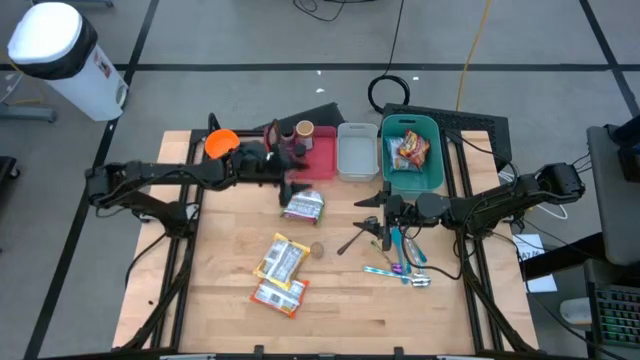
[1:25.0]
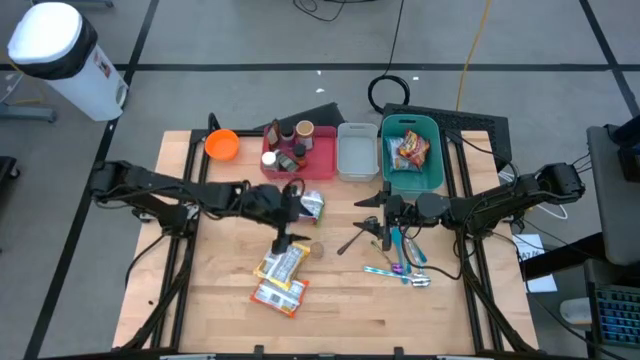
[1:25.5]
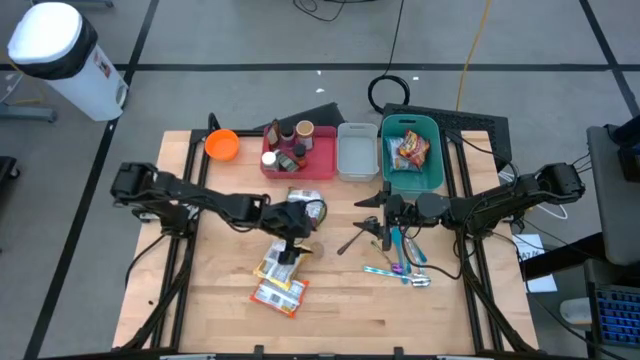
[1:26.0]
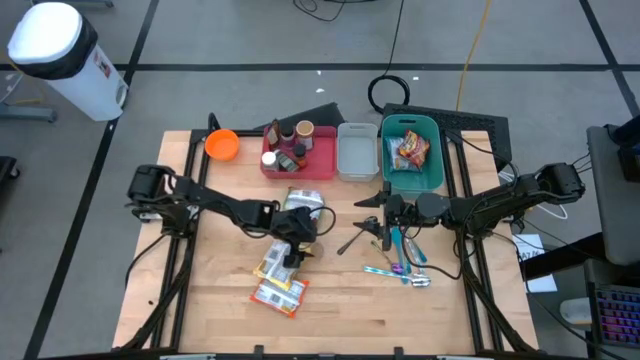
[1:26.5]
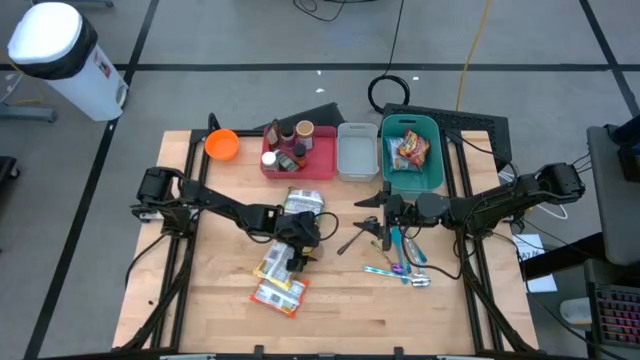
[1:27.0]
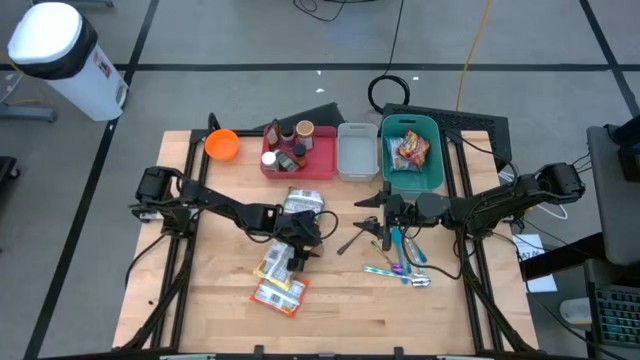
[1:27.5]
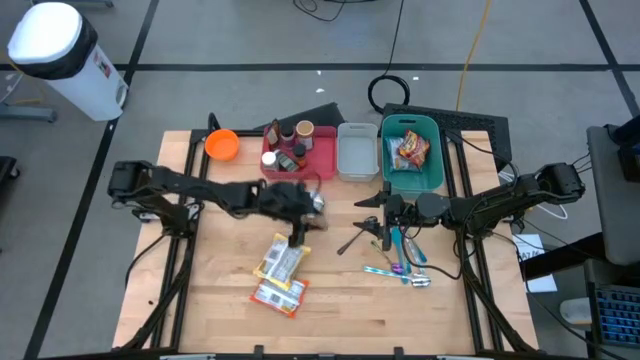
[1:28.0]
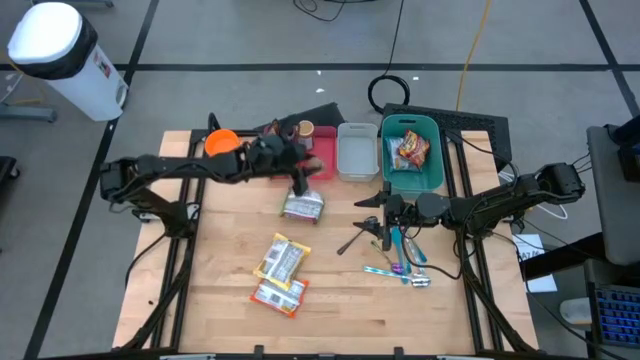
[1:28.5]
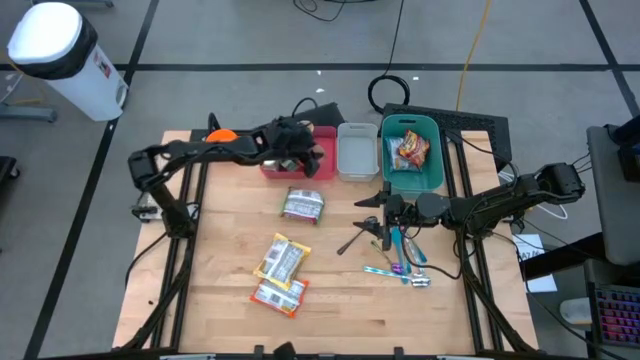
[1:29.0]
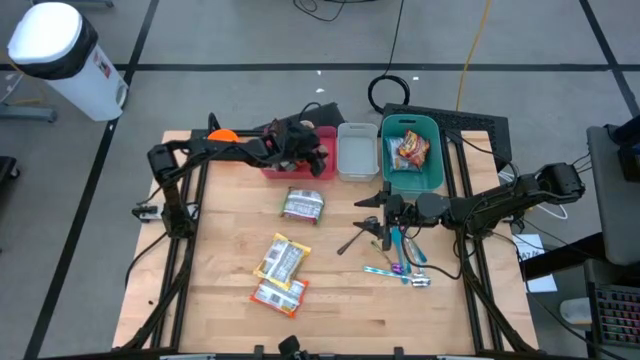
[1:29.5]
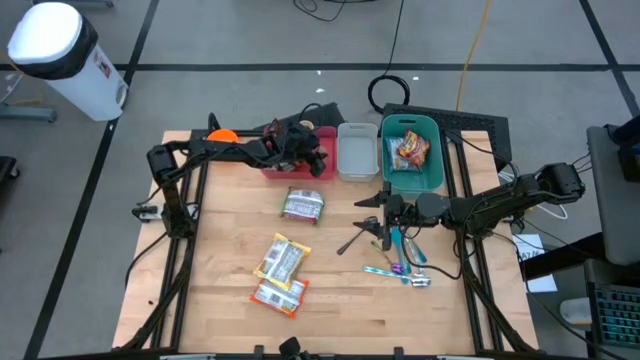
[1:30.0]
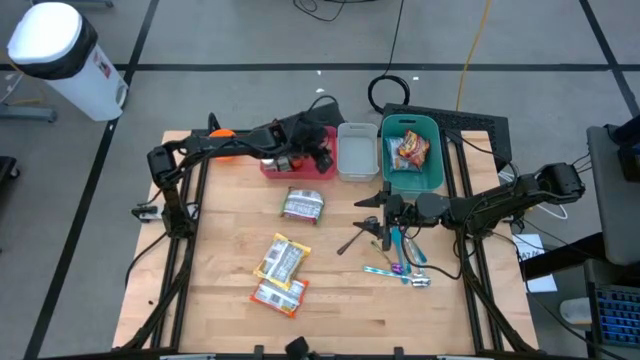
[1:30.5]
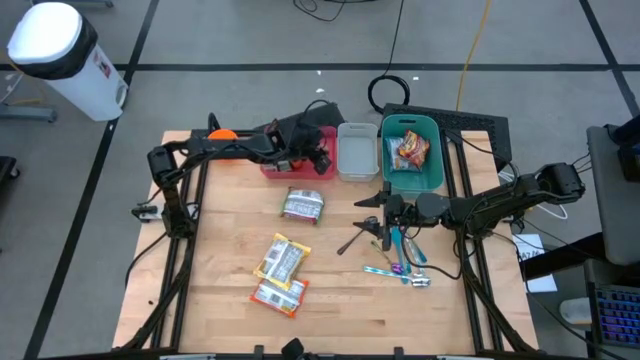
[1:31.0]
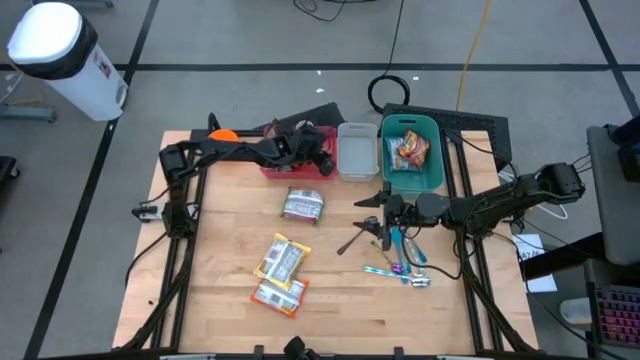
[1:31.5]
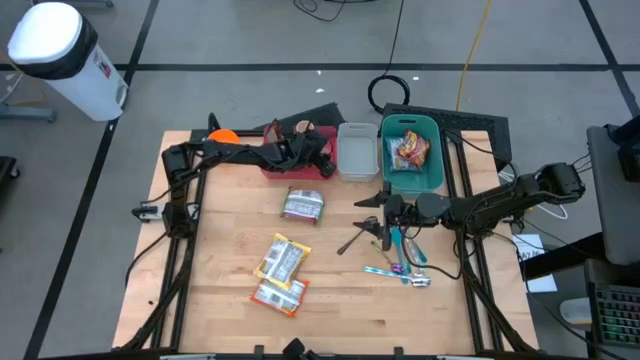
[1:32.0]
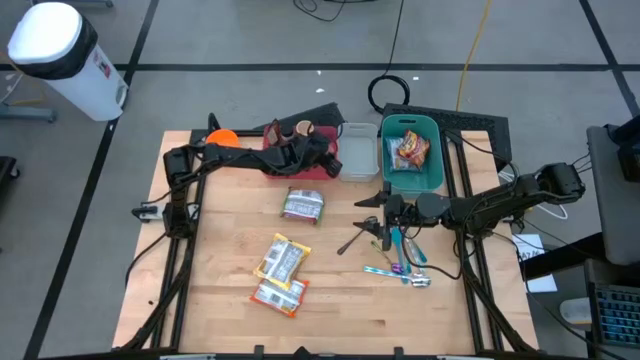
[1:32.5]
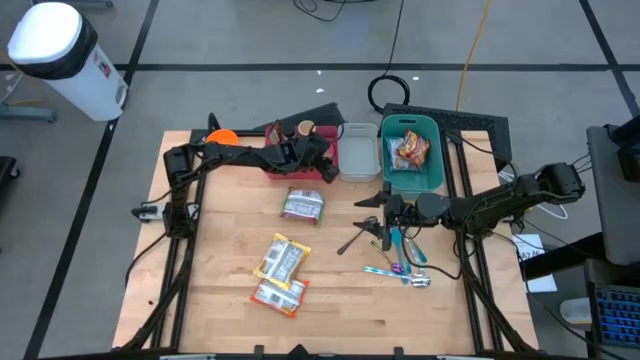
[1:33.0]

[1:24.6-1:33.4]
Task: Pick & Place Food Item
Put the brown seasoning bottle into the red bin

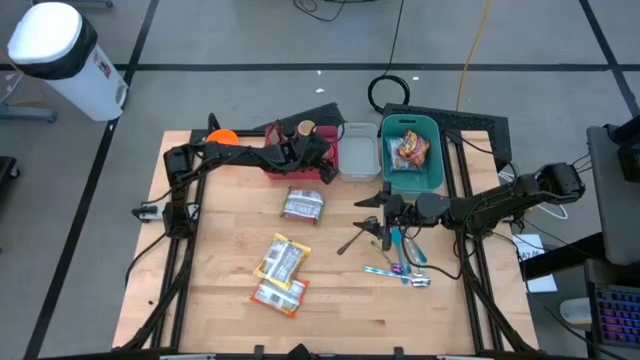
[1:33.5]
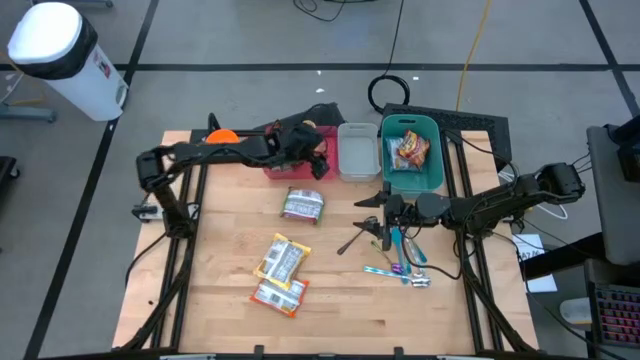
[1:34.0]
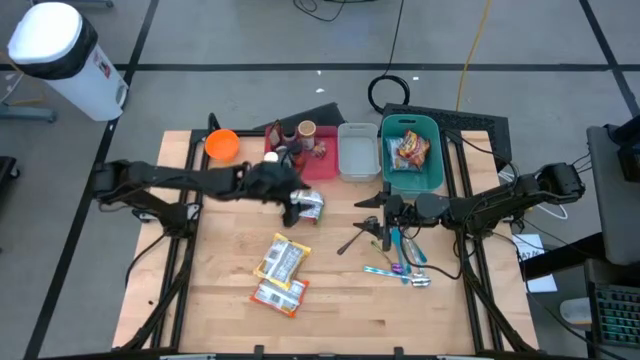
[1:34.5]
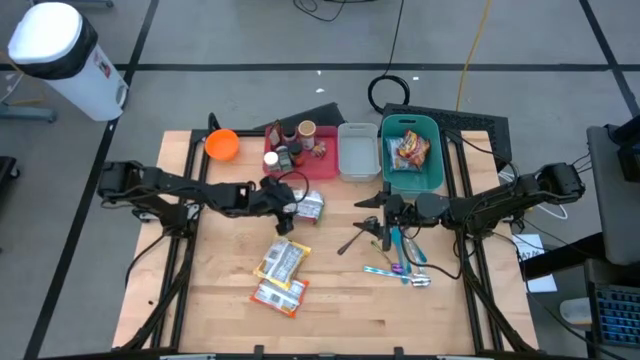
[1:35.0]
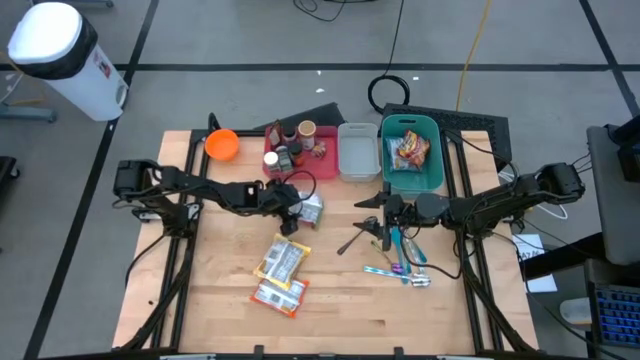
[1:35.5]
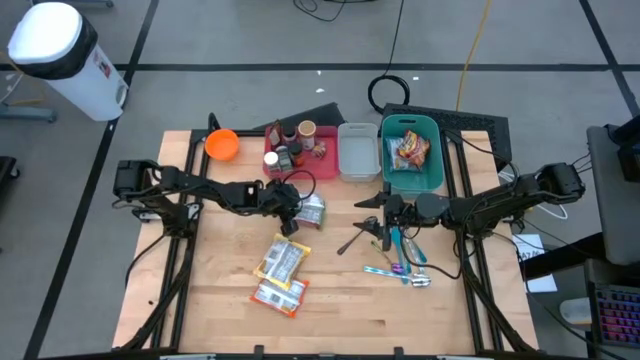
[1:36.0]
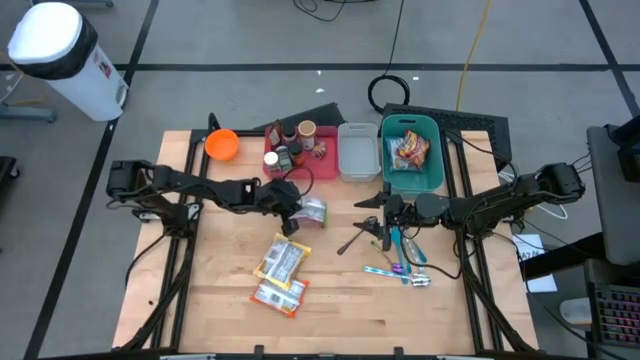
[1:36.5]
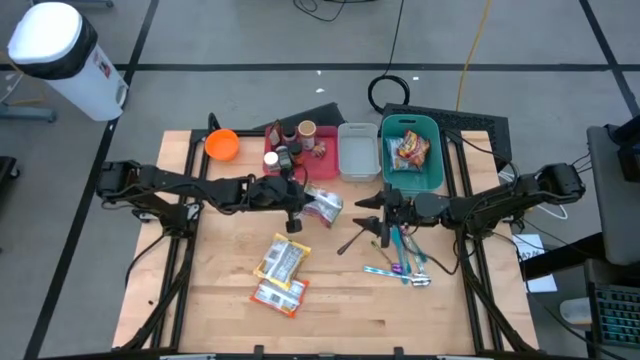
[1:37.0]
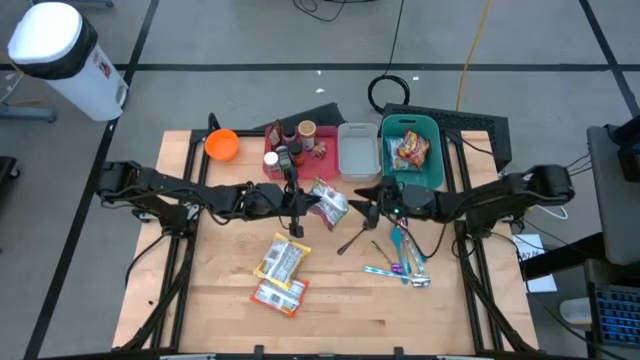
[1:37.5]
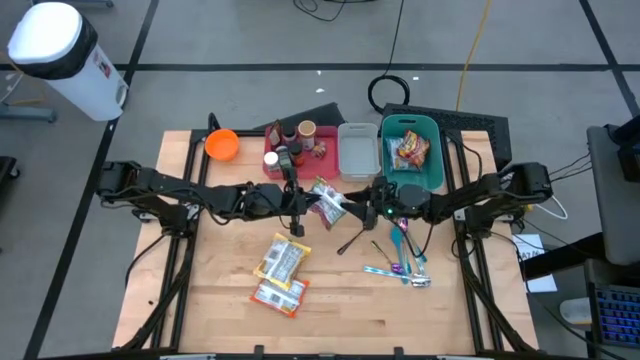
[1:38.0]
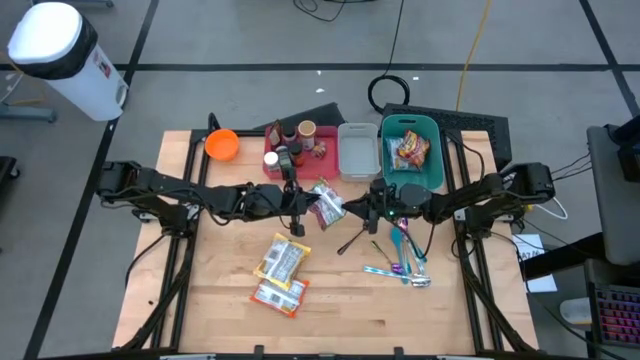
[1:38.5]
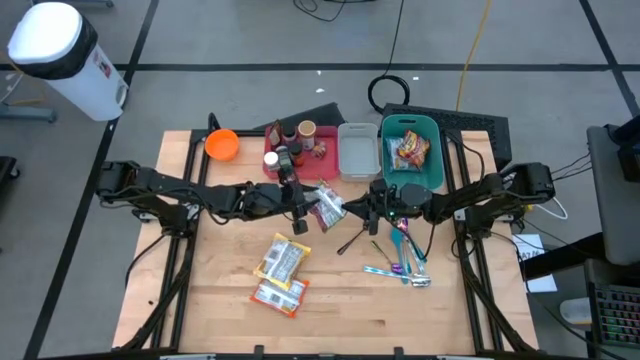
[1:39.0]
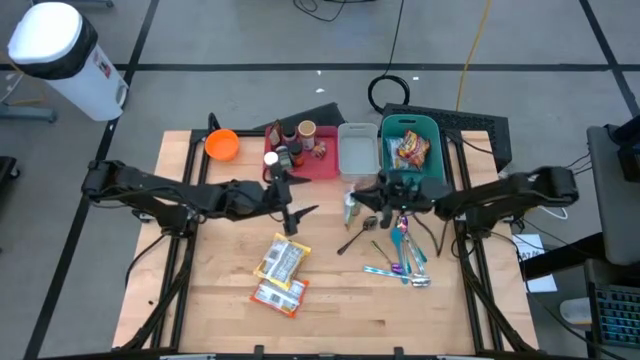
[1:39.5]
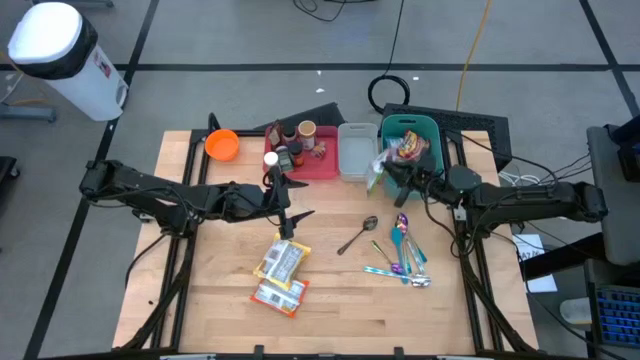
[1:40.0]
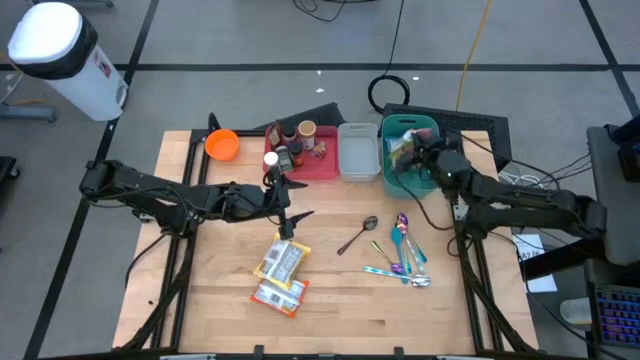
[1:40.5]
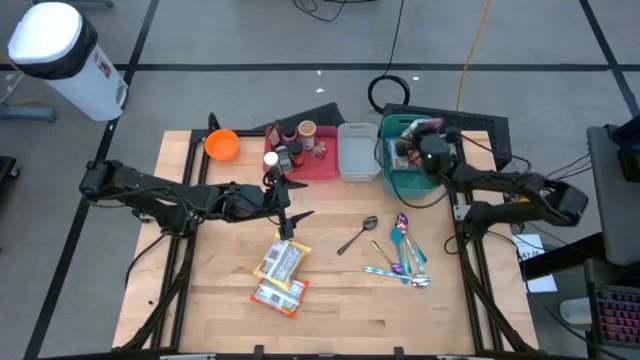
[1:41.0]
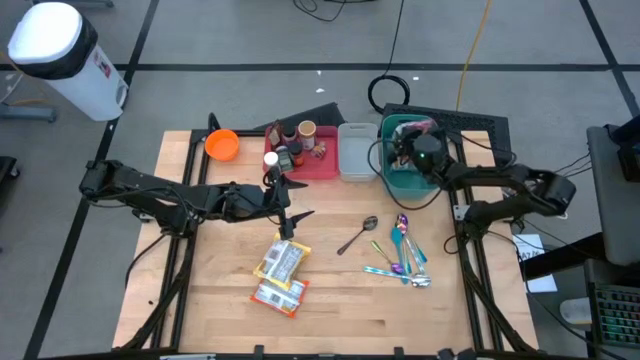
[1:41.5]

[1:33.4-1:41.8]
Put the green noodle pack into the green bin
